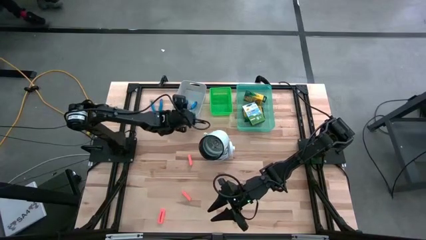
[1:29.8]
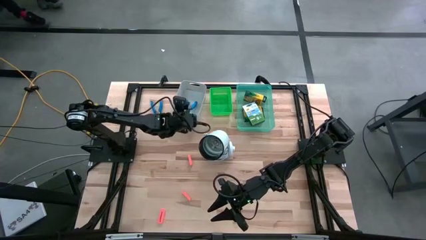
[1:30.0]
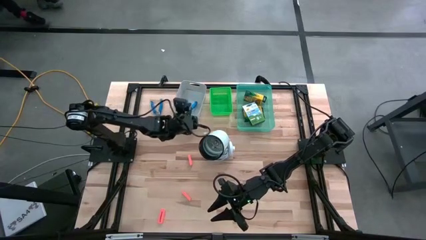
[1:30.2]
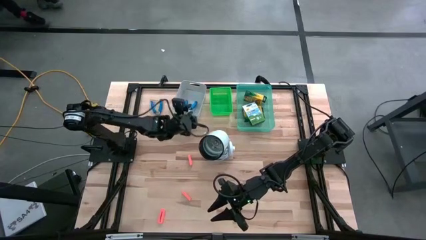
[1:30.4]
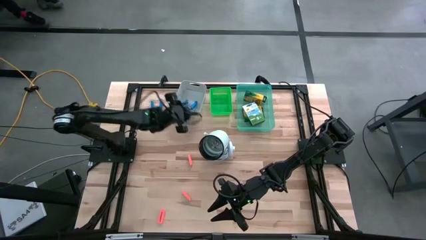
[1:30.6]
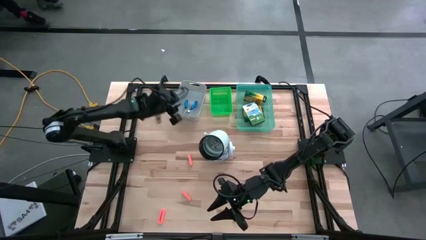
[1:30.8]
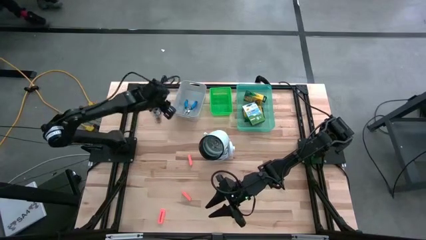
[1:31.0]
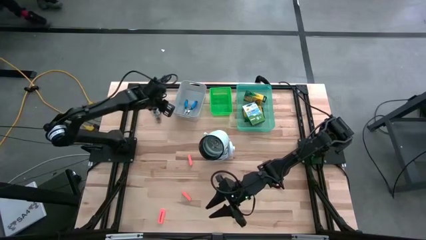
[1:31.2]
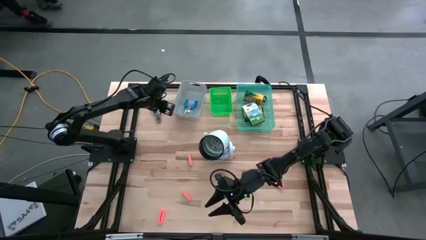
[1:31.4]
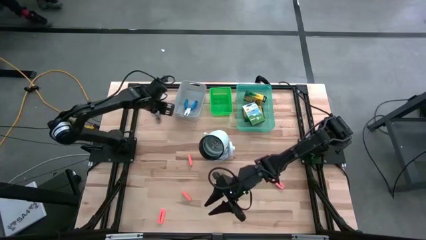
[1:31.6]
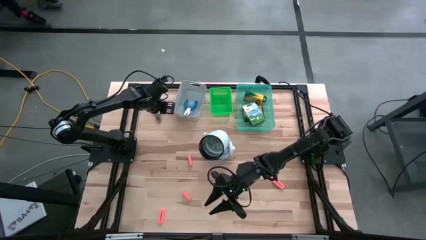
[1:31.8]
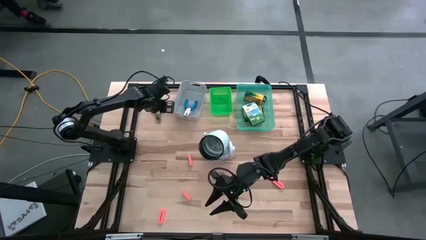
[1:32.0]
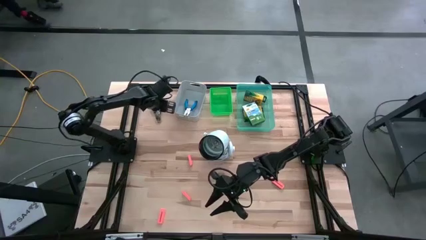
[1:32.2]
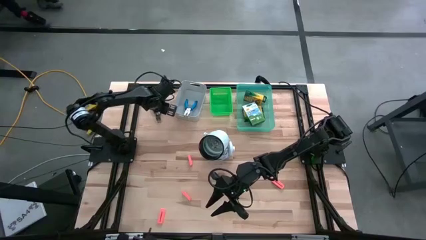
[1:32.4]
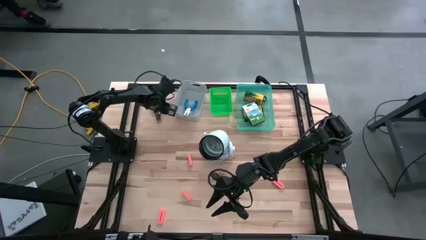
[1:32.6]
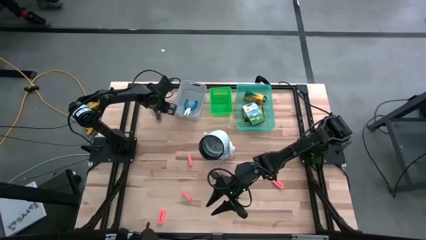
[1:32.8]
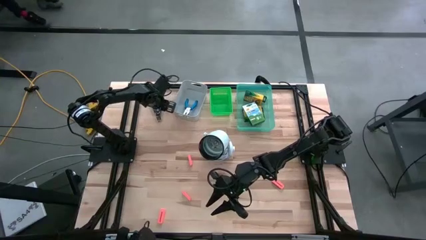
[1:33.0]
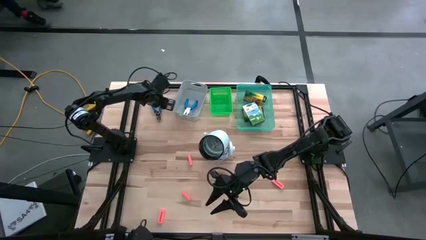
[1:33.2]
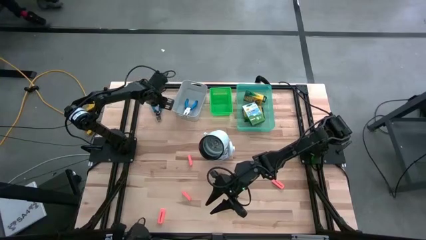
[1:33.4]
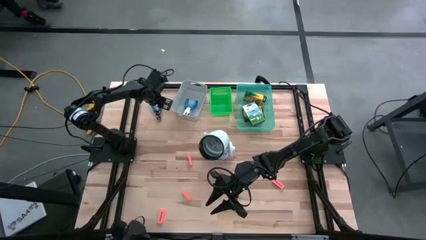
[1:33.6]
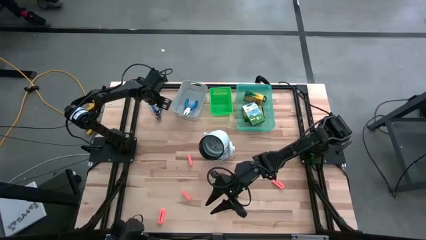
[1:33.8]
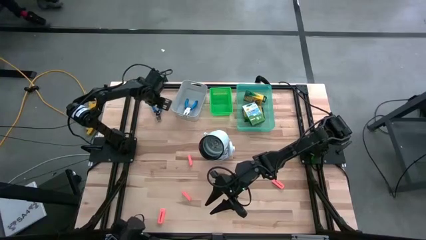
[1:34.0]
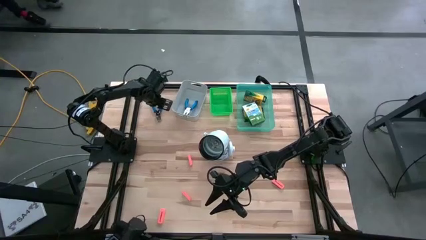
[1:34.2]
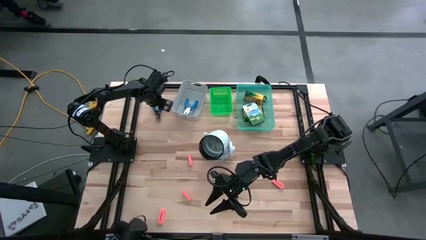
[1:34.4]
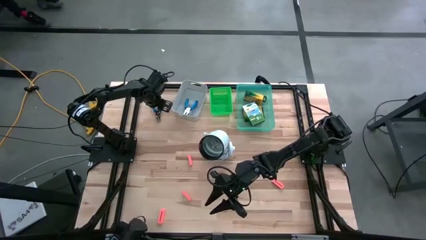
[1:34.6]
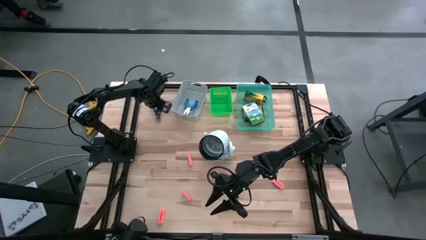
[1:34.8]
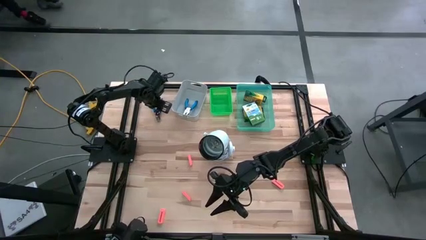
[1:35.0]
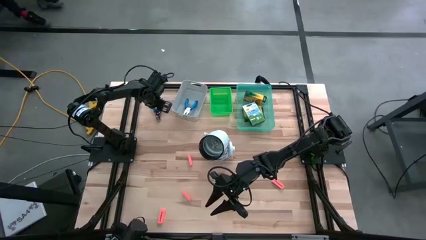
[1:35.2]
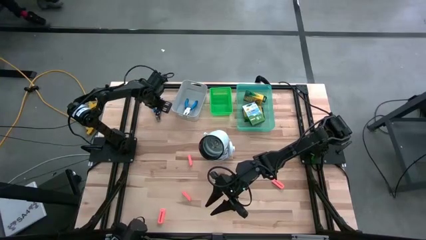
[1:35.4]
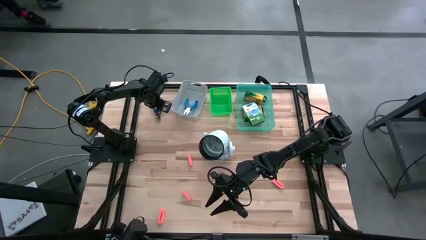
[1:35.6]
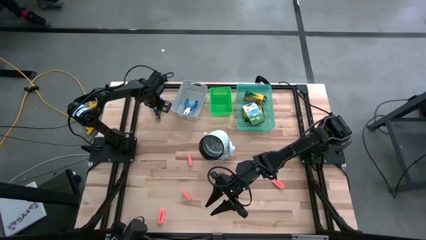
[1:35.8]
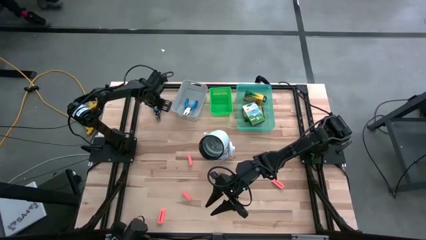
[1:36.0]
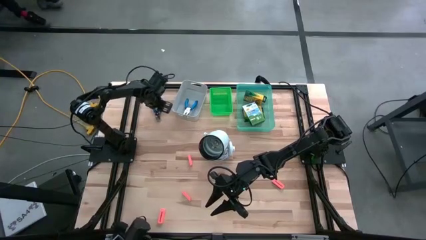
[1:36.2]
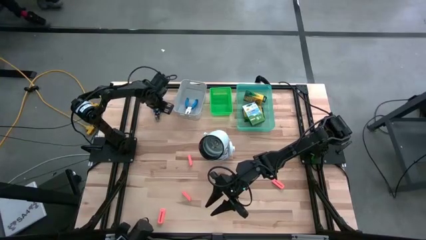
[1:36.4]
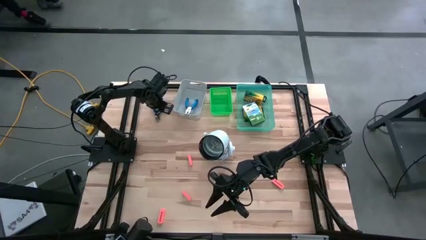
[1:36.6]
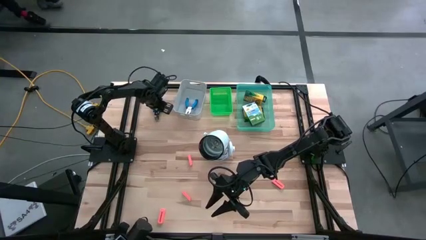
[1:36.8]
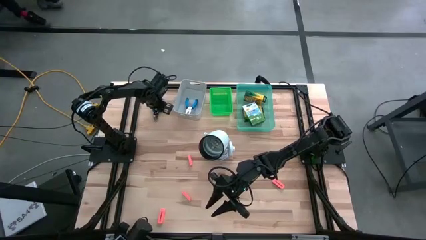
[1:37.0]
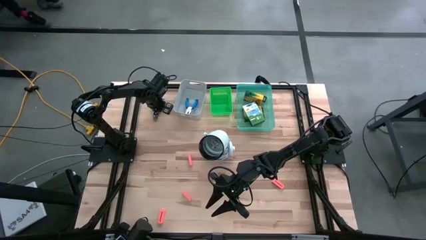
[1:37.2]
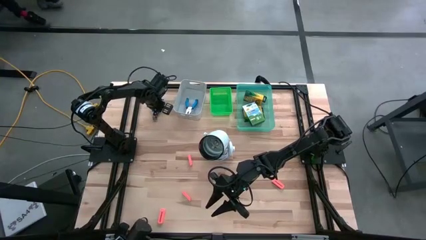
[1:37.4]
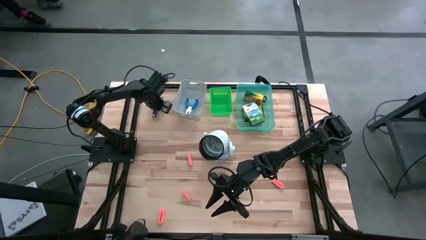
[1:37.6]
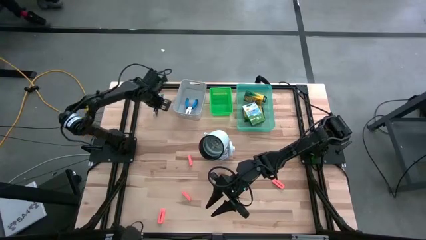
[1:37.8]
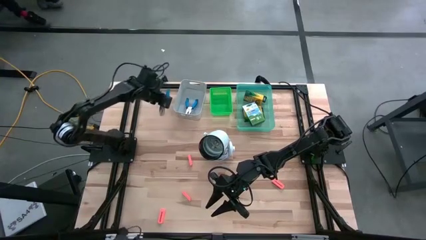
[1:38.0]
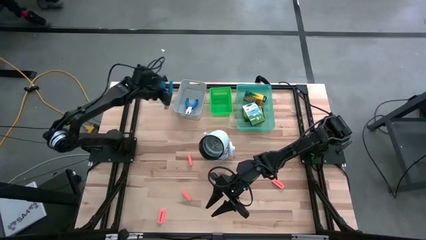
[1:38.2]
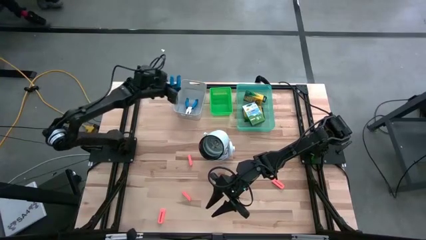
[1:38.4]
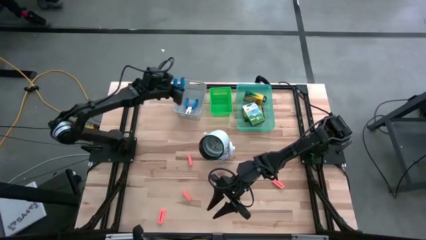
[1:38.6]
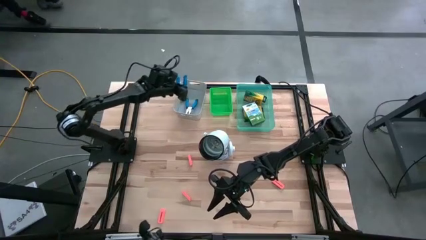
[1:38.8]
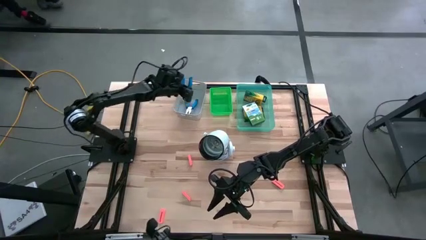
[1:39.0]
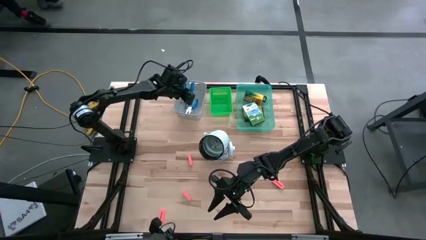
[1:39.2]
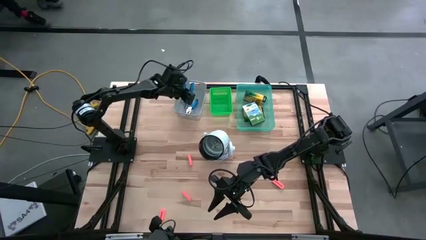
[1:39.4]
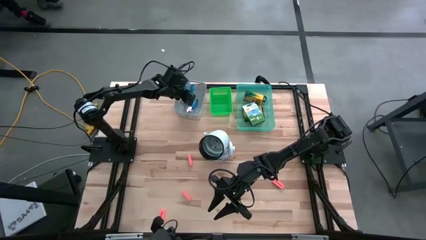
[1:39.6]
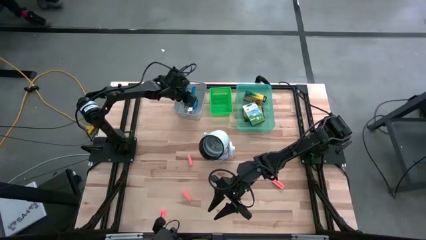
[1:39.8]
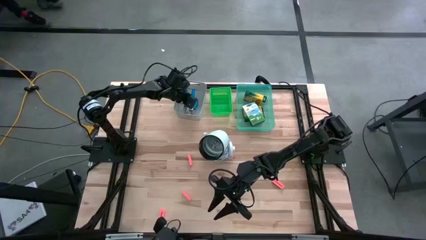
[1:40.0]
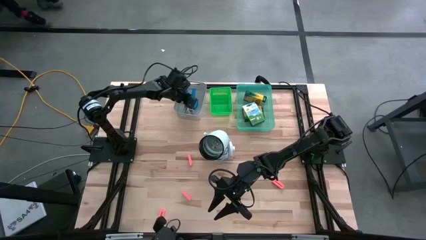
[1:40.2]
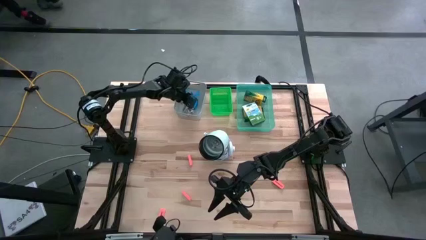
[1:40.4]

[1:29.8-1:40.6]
Task: Pick & Place School Supplies
Put the blue hole puncher into the gray bin

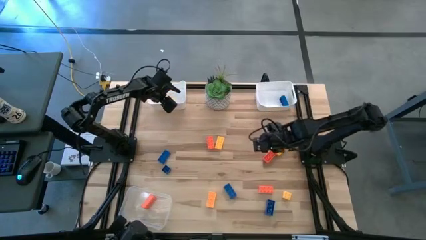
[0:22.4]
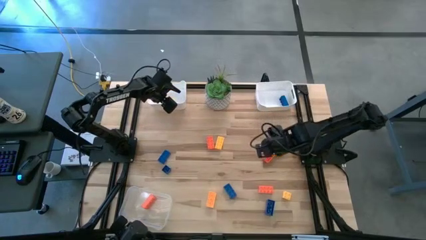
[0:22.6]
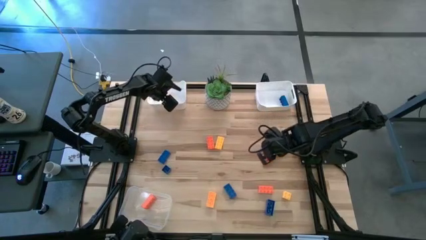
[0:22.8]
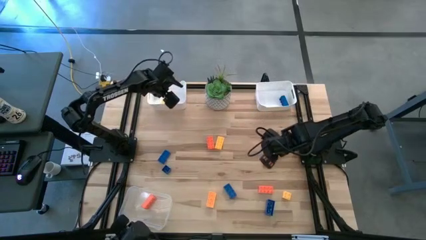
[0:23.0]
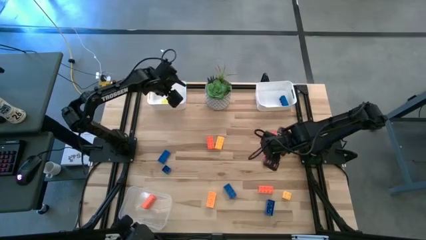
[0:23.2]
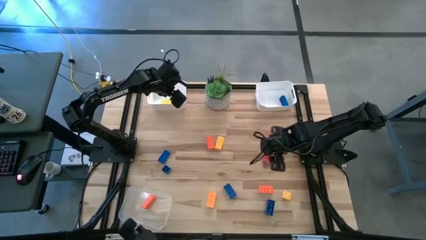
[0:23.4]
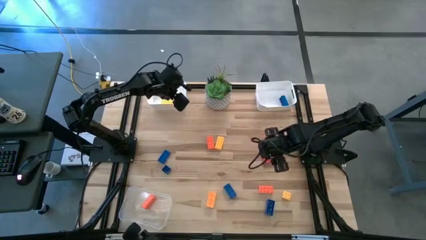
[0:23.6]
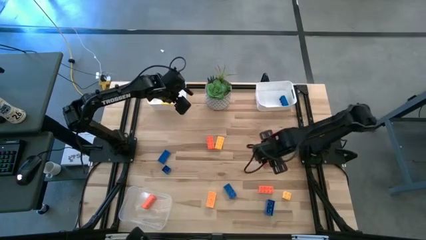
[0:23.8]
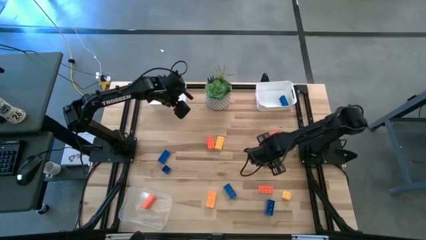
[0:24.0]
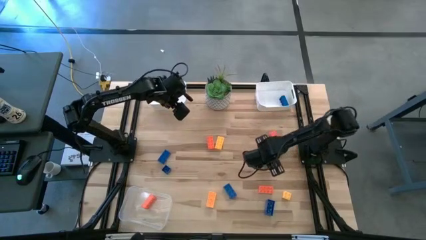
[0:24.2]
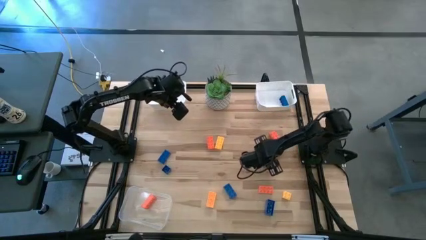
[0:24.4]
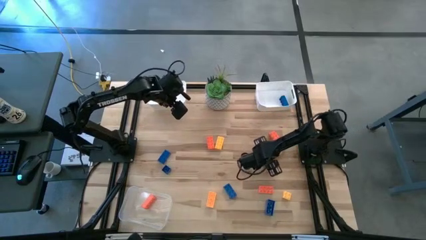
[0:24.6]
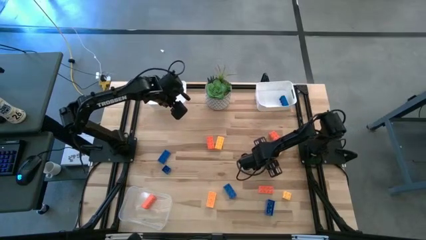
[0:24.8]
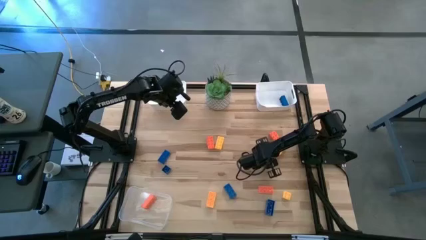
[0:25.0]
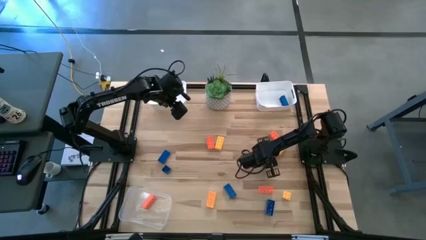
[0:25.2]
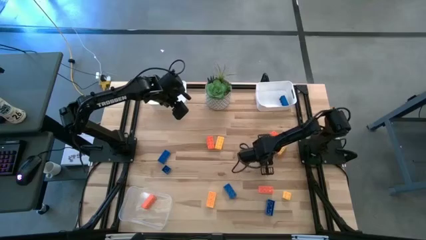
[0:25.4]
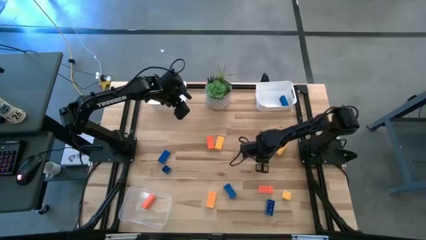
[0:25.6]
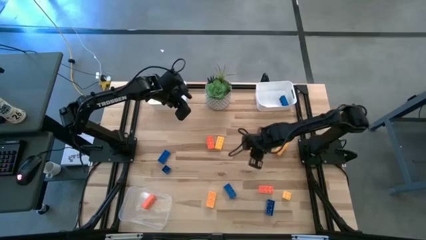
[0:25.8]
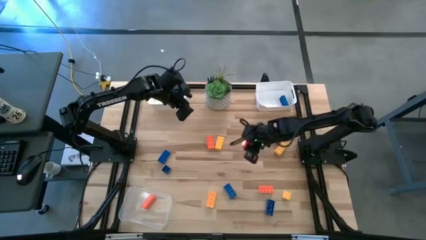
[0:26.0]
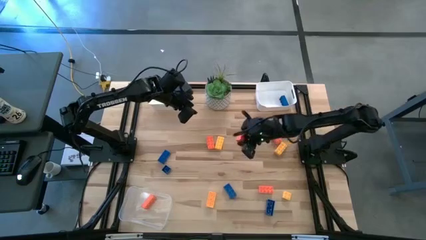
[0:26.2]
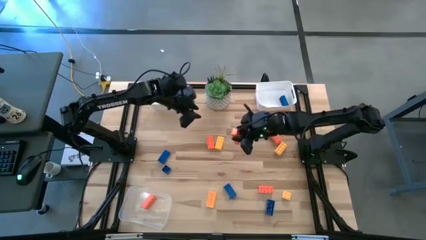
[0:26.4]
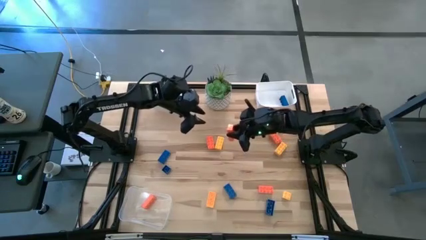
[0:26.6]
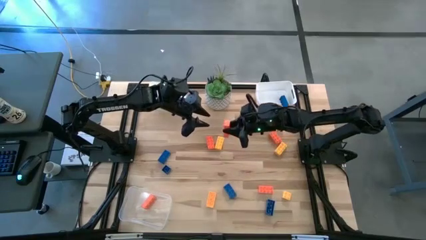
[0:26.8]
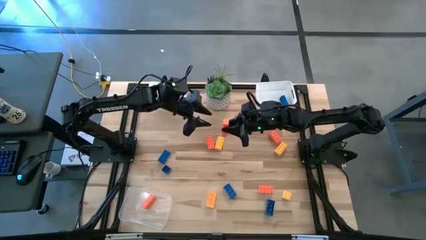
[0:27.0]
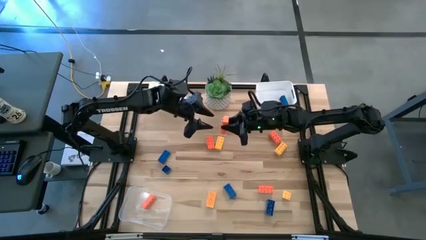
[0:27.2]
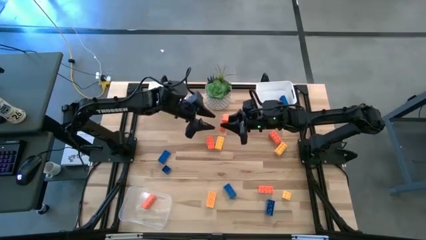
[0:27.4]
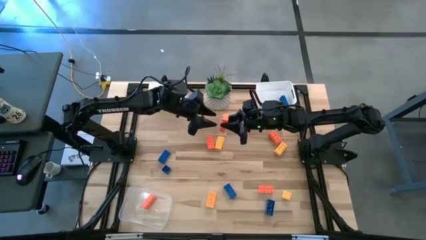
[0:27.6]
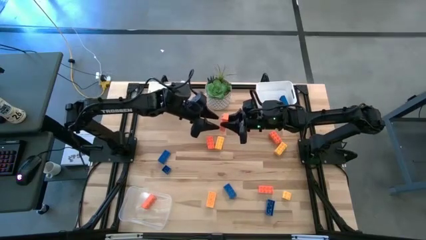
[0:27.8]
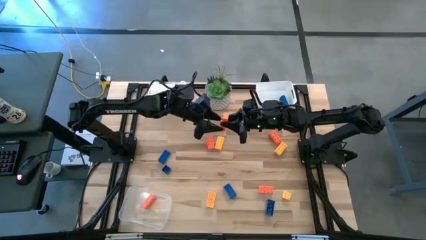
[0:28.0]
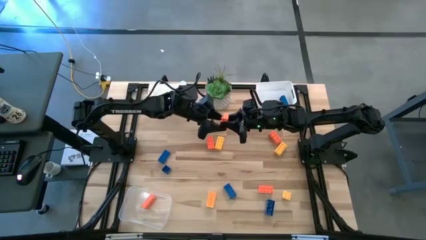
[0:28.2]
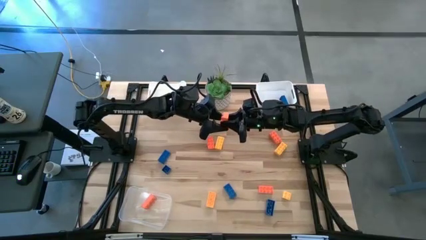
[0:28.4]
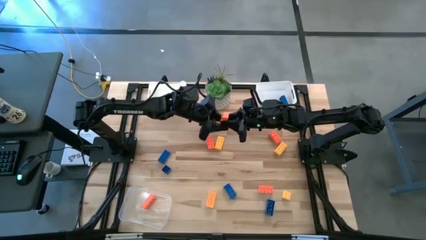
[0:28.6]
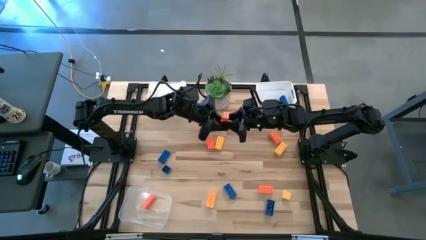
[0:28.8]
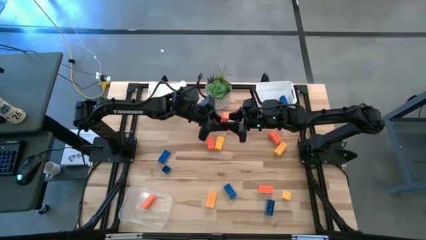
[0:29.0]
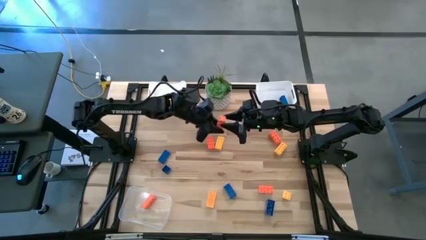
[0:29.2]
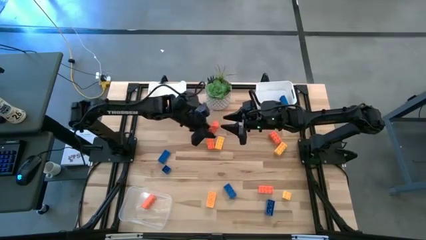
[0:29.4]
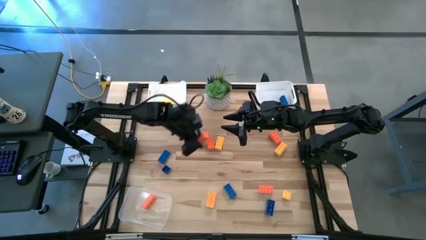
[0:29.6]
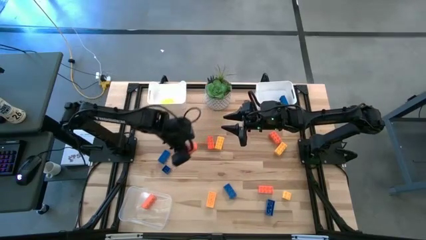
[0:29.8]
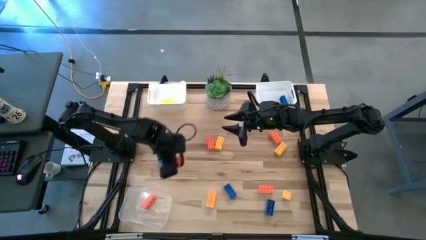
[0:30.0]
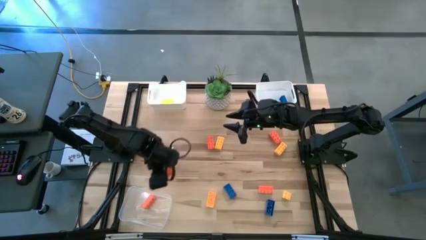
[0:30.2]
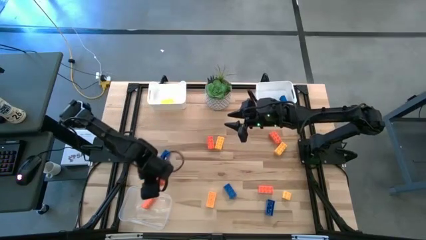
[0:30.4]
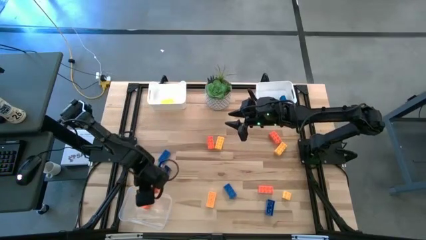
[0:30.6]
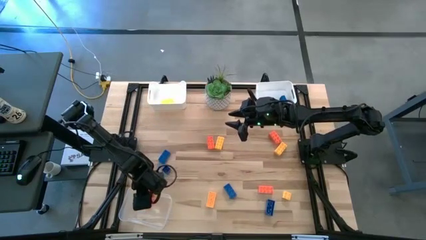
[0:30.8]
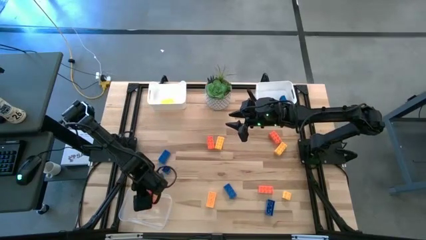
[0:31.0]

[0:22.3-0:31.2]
Task: Sort & place blocks by color
Put the orange game piece into the transparent bin
